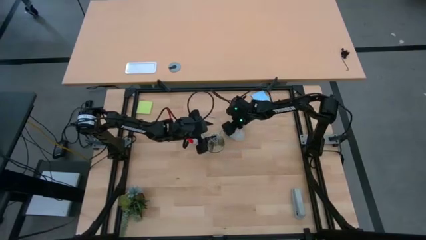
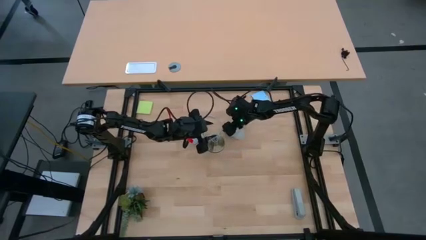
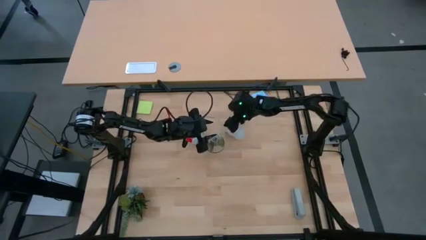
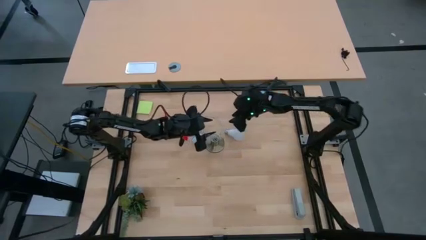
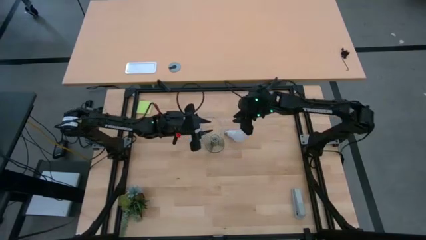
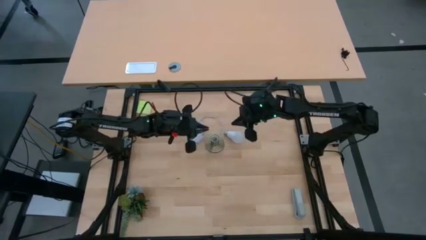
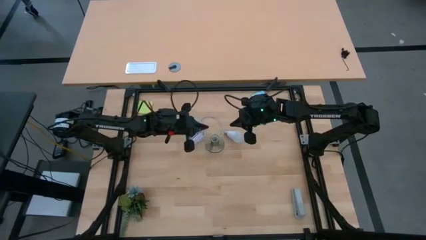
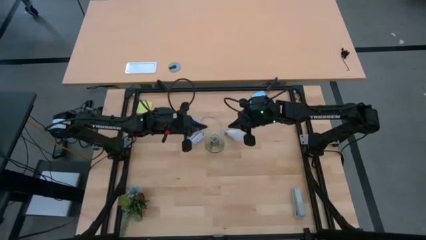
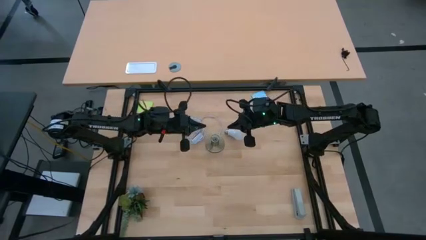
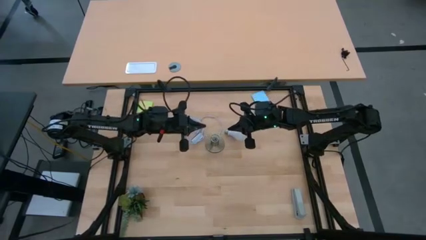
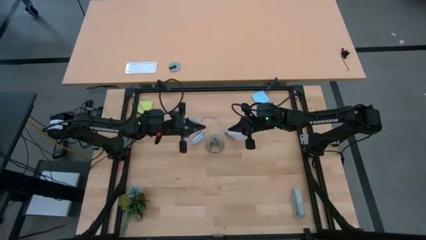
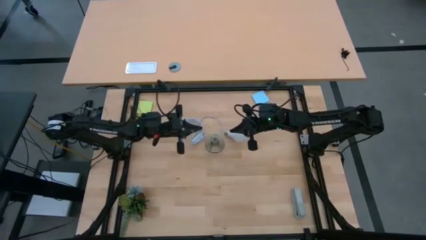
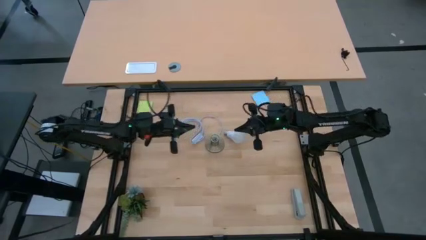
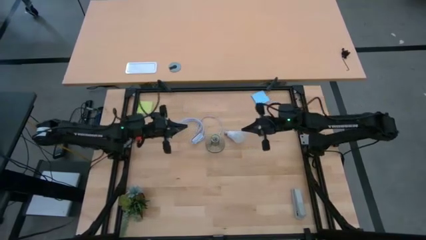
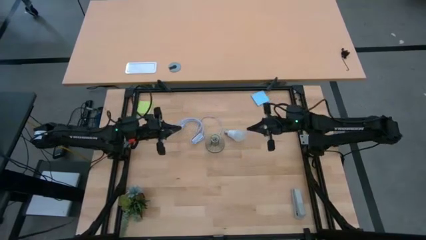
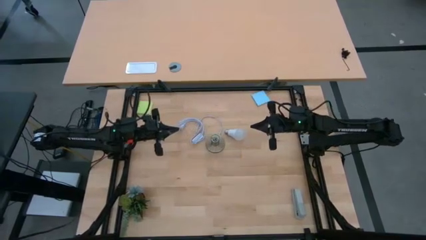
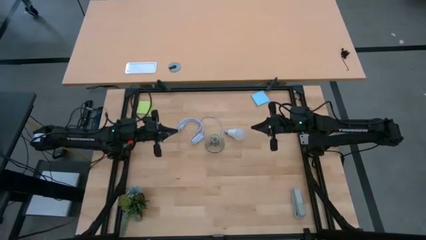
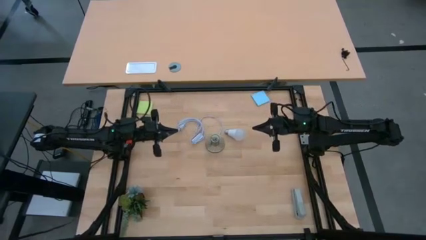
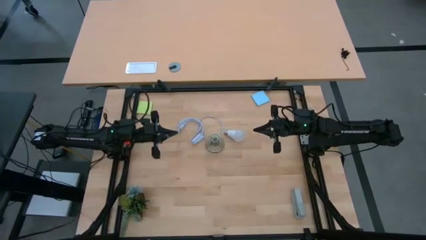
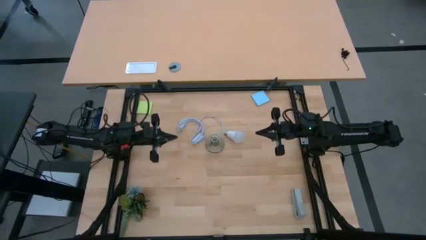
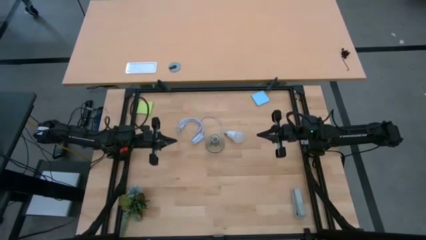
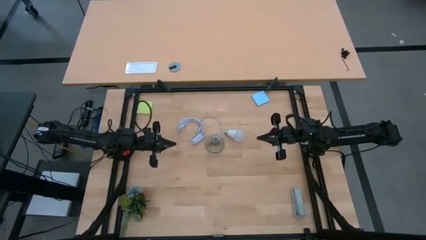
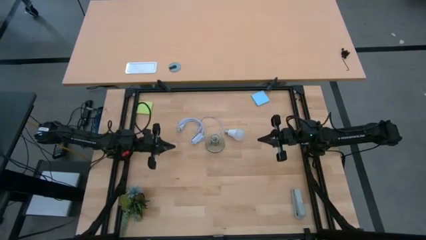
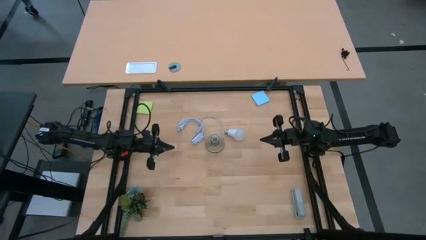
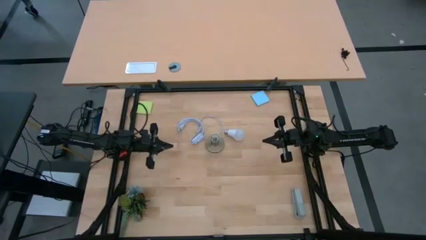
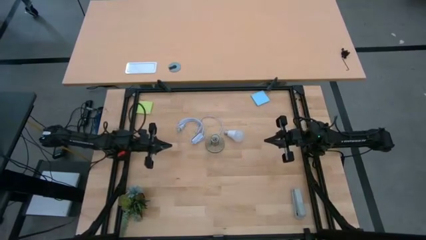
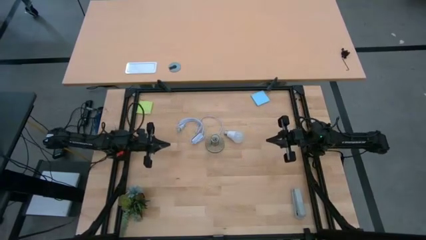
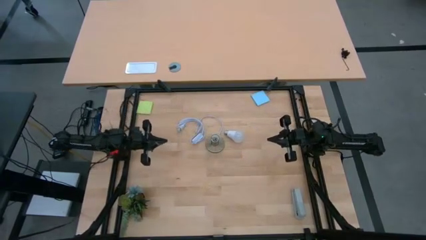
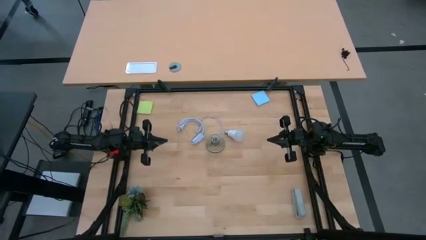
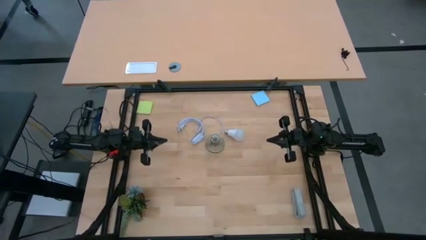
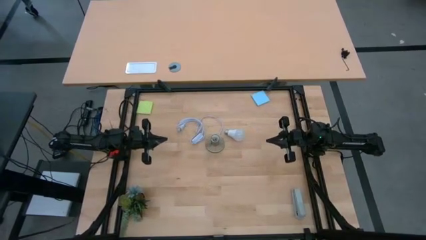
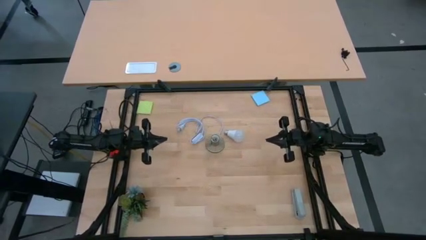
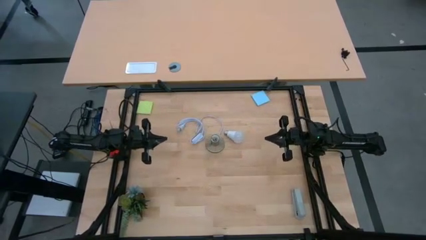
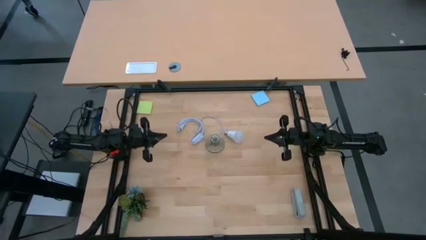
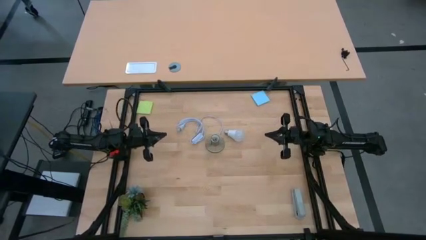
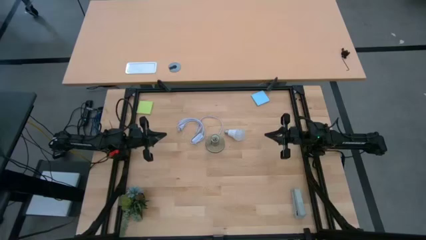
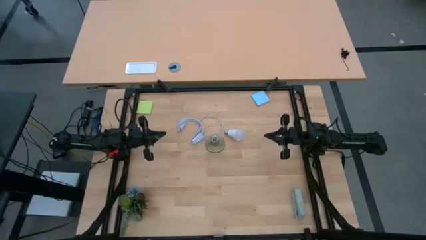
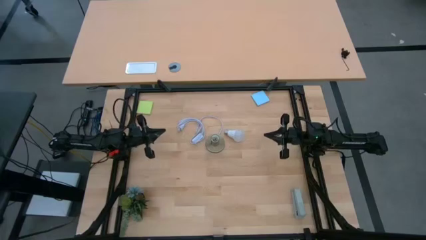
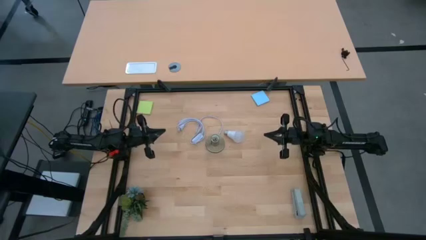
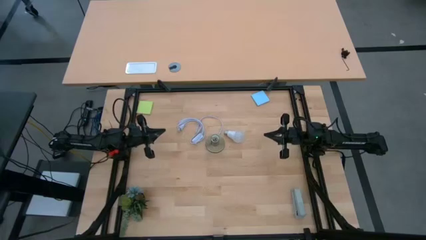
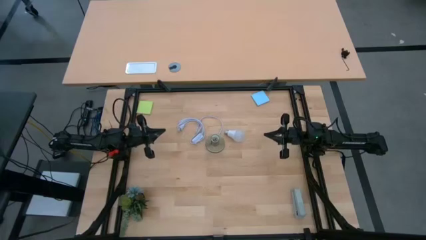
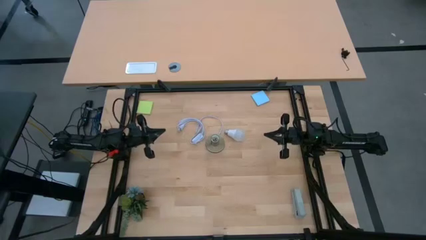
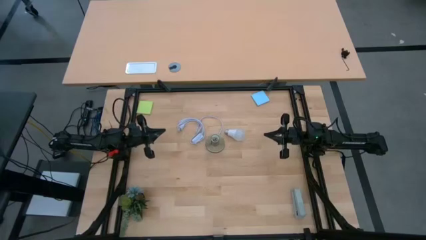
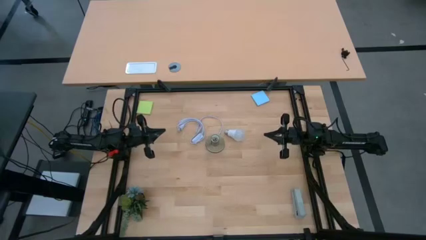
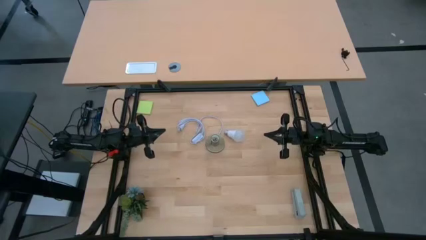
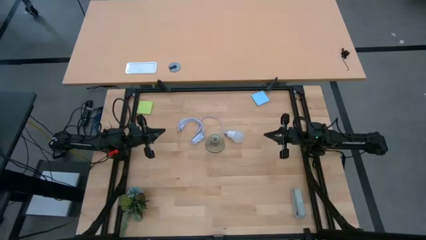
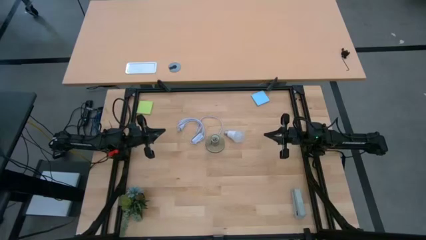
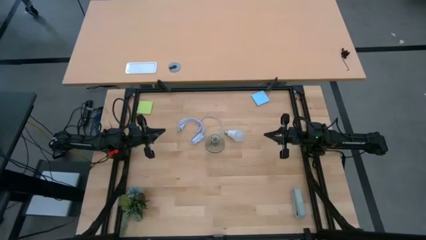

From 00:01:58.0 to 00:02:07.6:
Task: Screw lightbulb
Return to Home Position

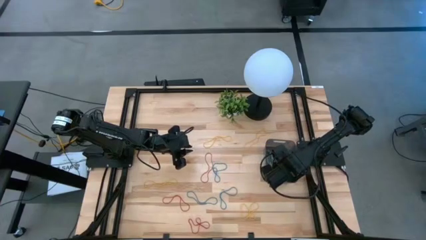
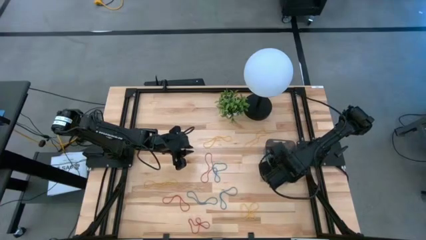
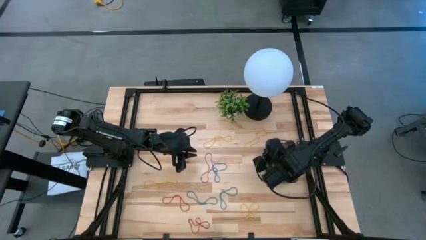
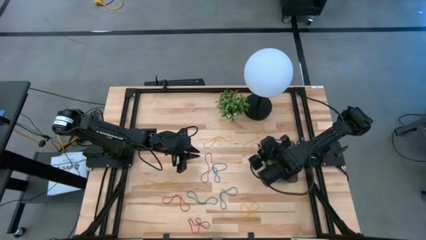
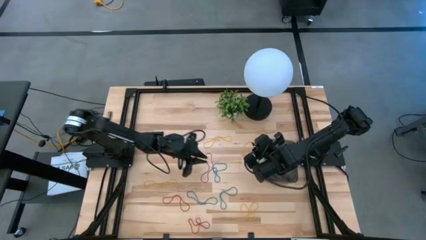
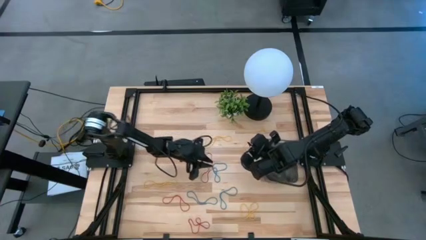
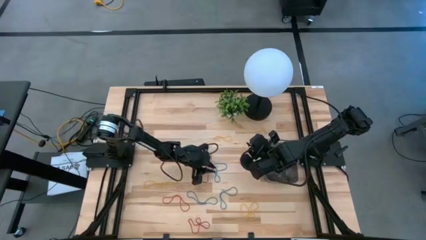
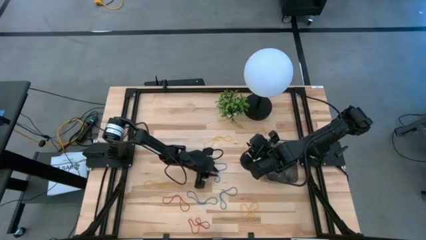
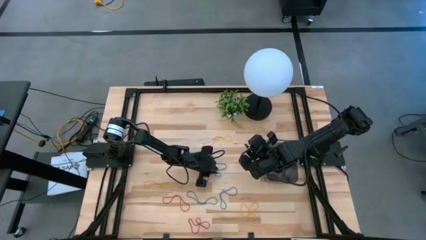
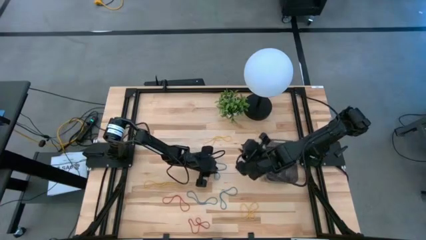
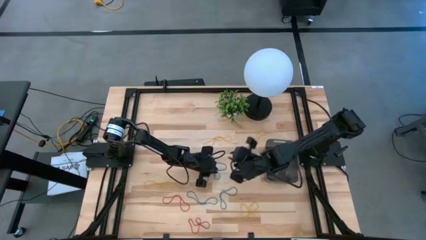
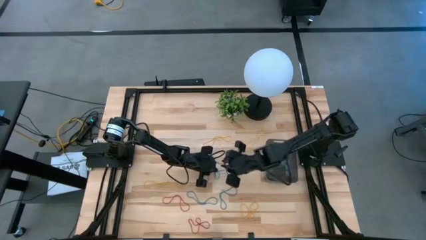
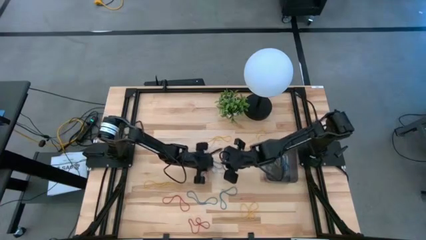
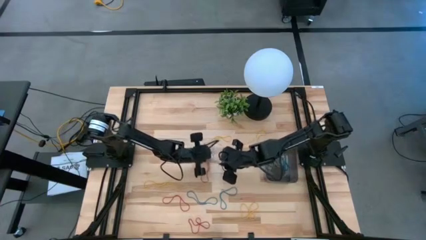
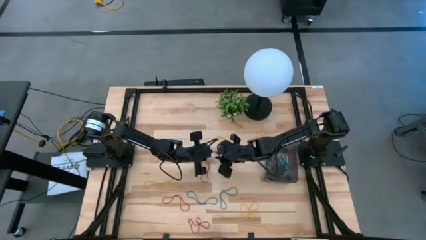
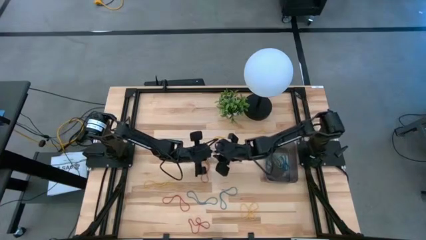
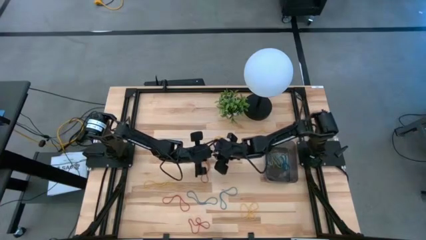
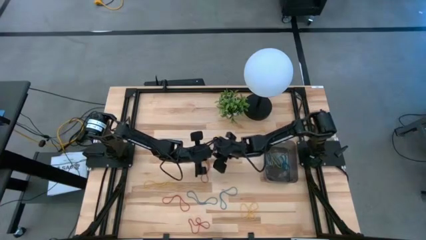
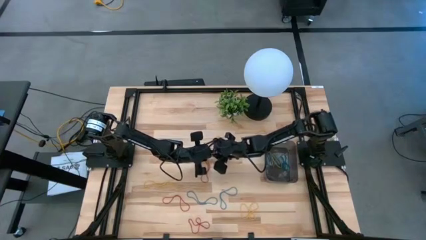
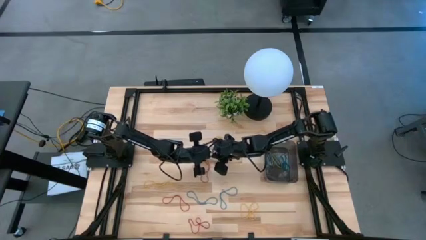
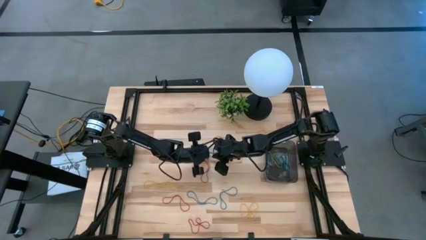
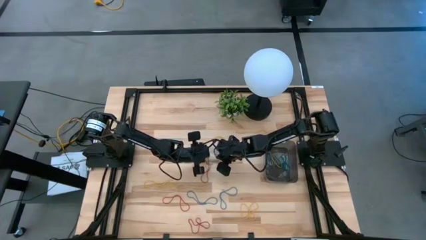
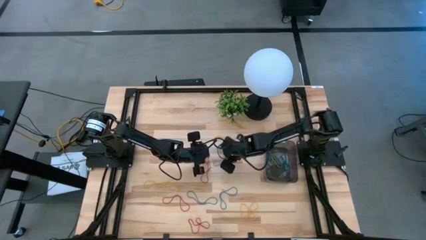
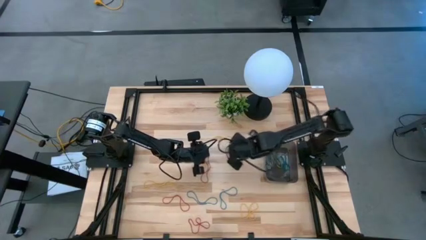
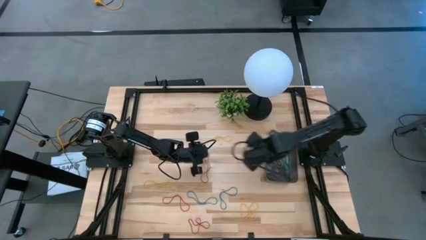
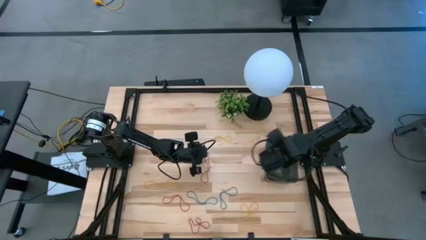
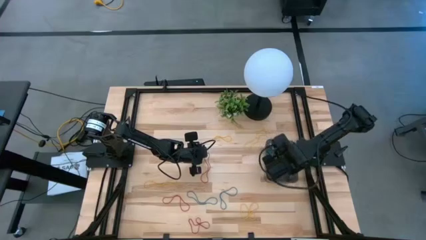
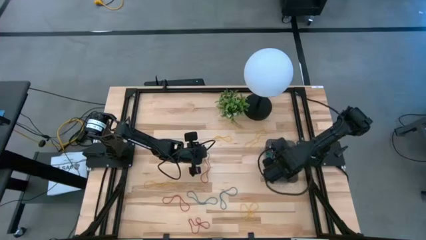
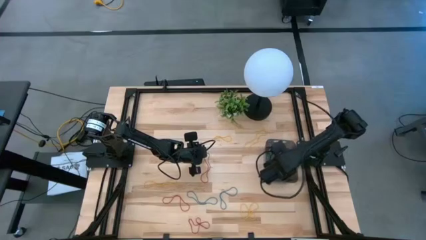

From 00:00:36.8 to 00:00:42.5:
Task: Pick and place items into bin
Put the top blue rubber band into the black transparent bin

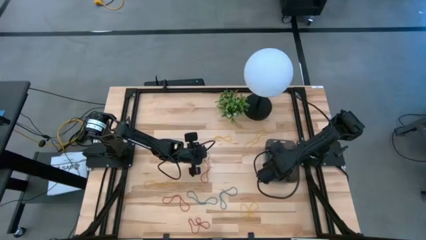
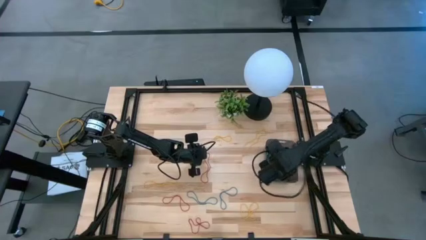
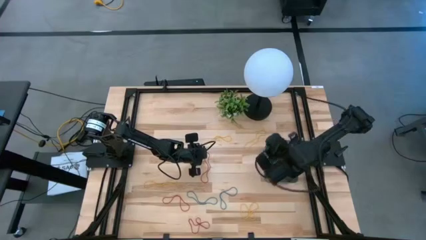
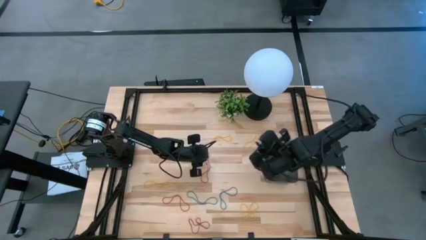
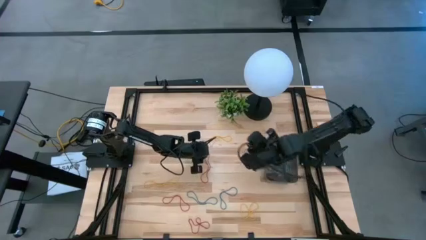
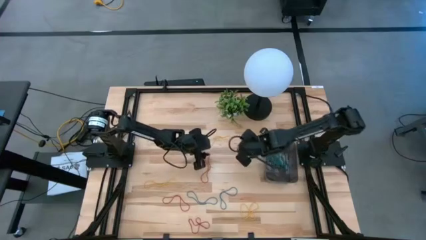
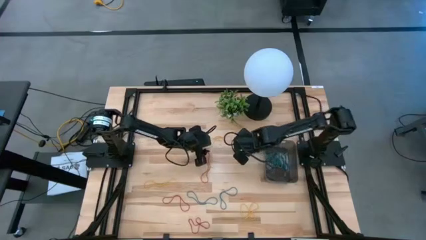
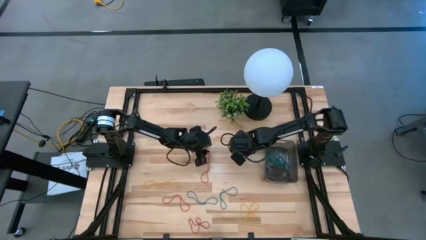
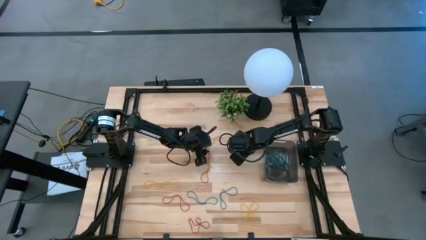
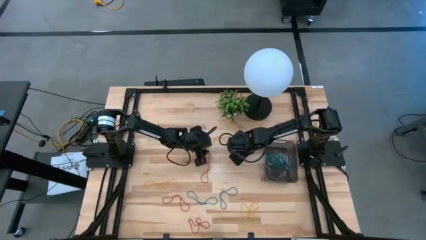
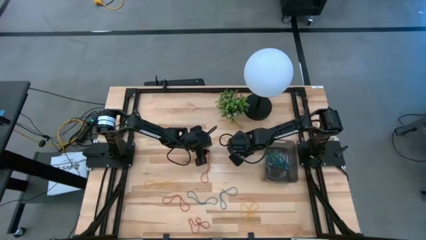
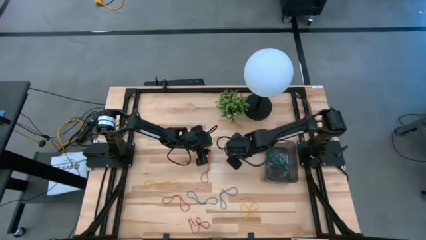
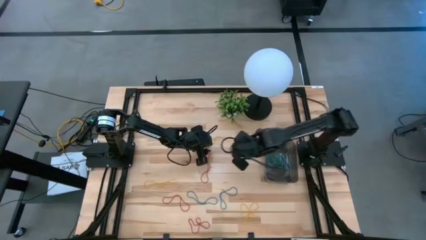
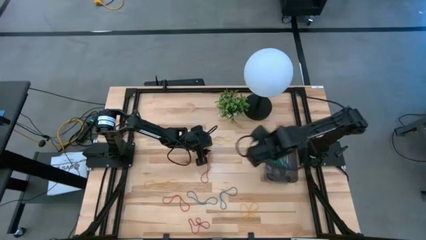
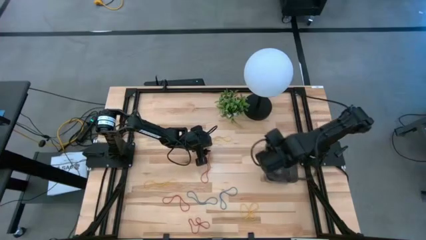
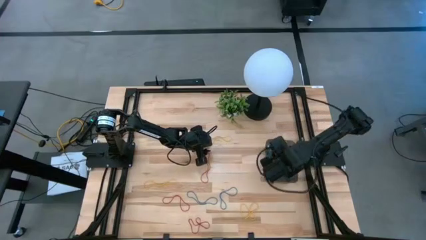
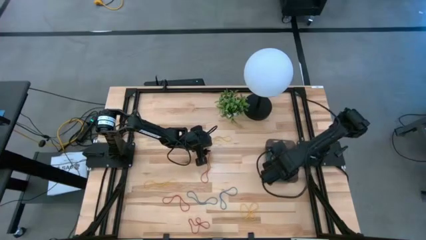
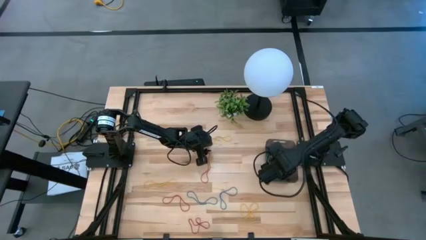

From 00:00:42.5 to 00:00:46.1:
Put the yellow rubber band into the black transparent bin
